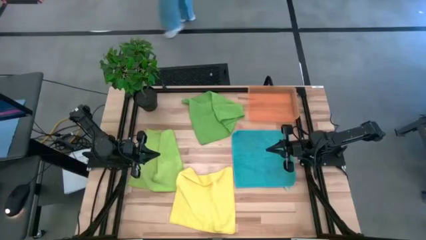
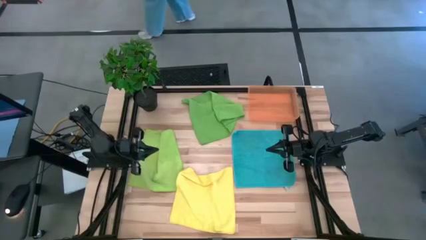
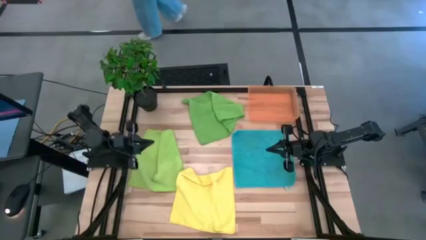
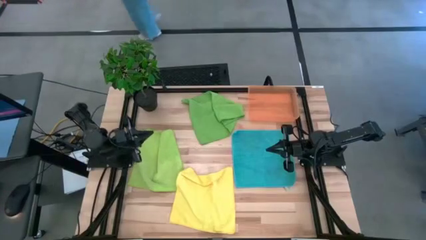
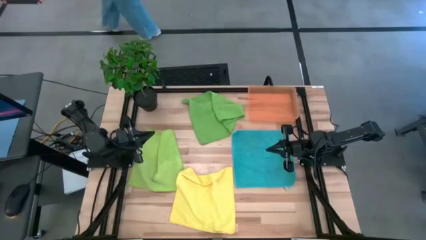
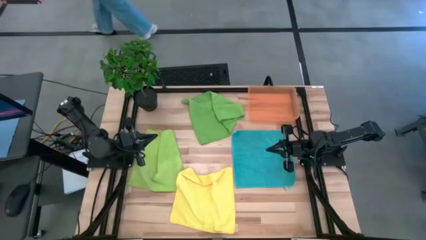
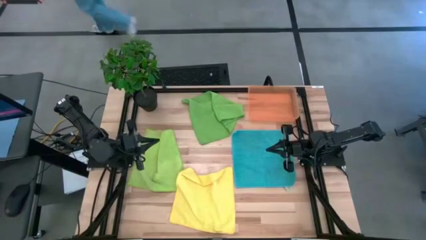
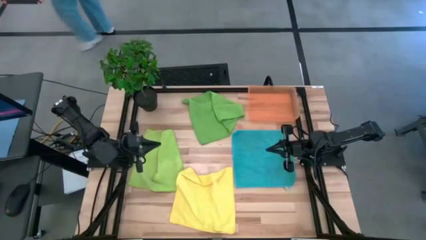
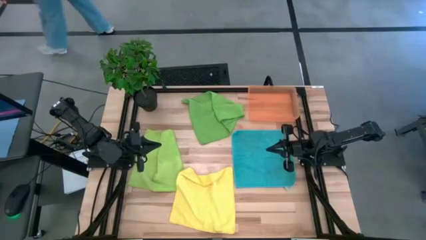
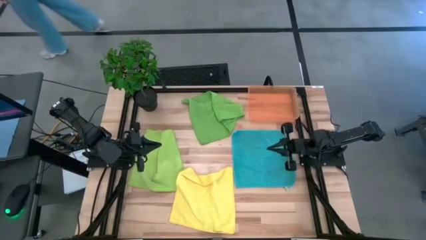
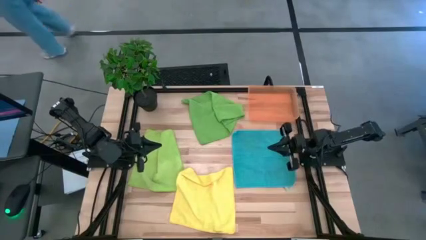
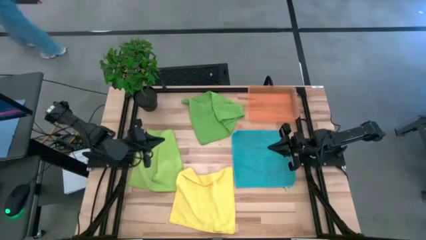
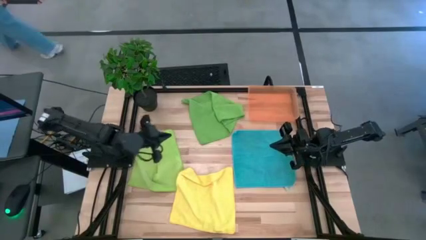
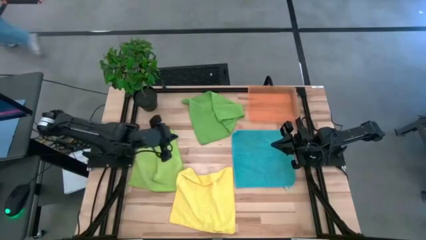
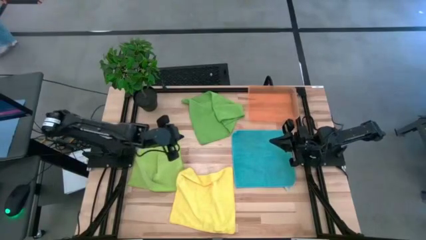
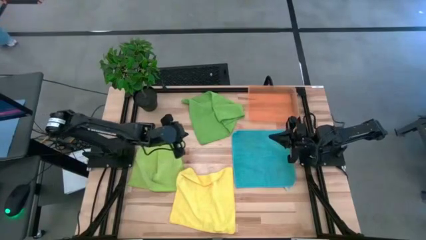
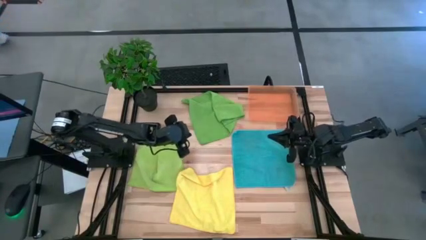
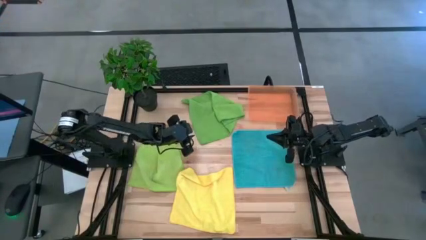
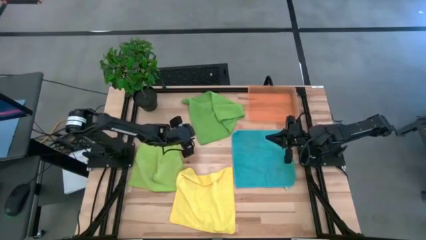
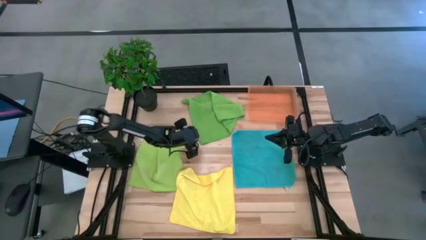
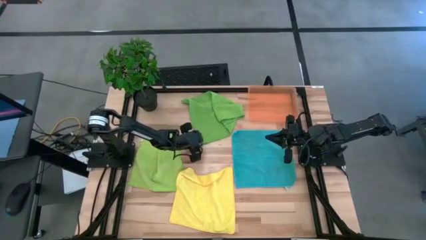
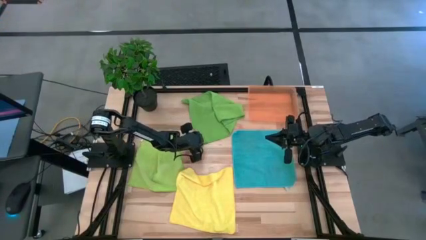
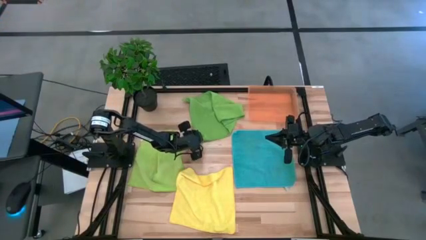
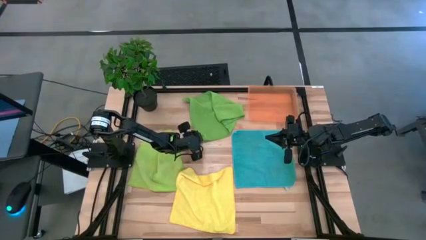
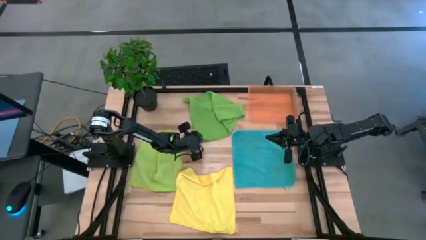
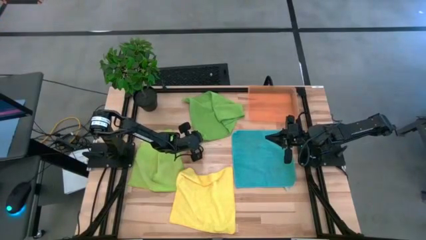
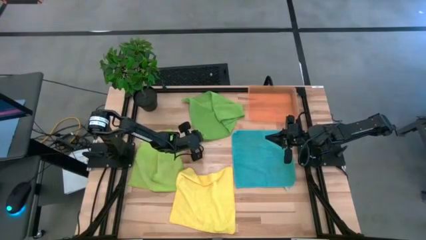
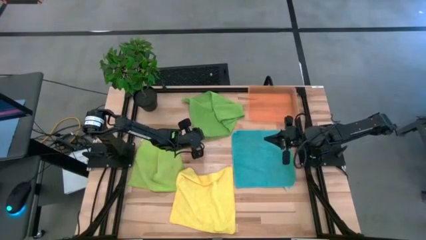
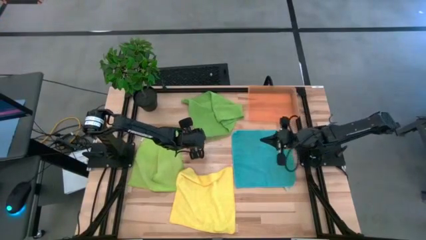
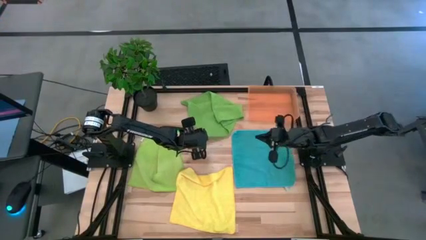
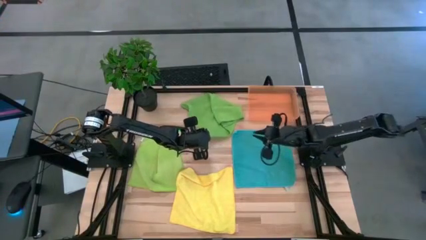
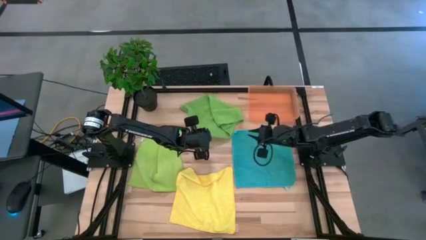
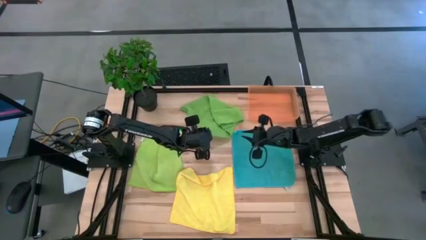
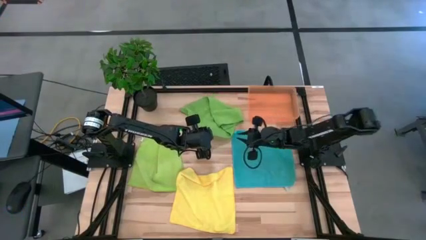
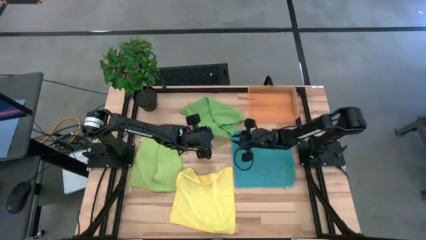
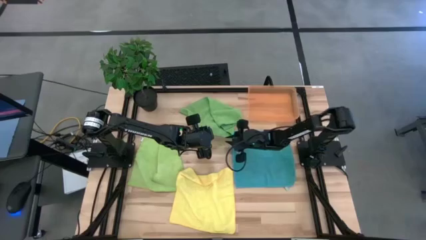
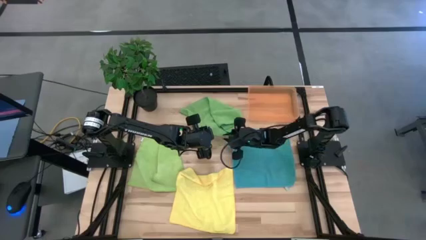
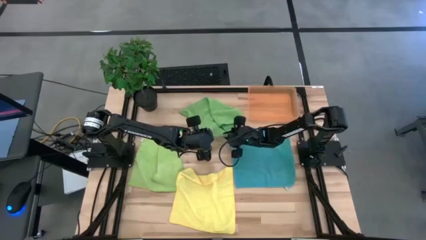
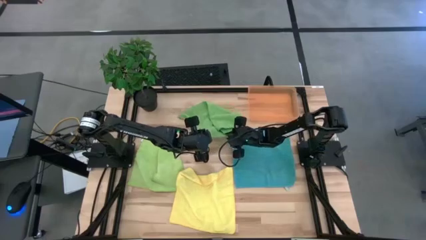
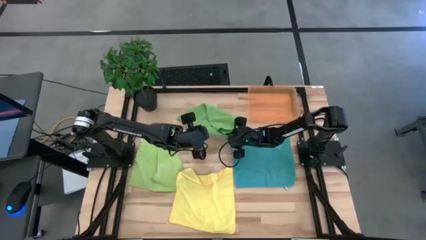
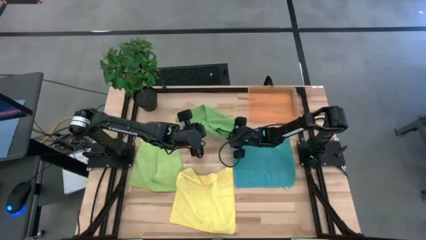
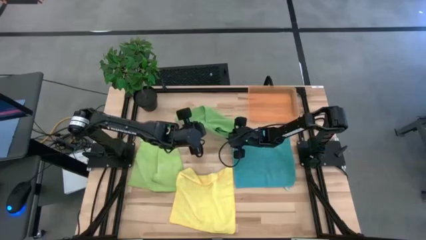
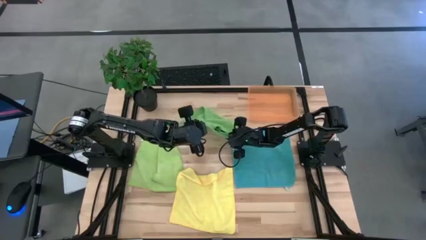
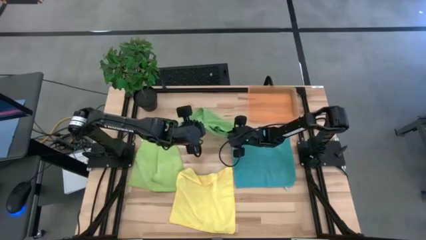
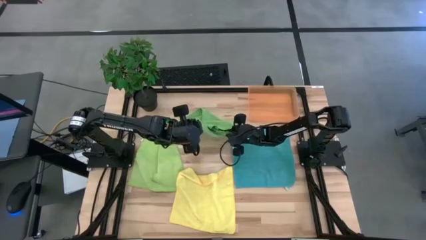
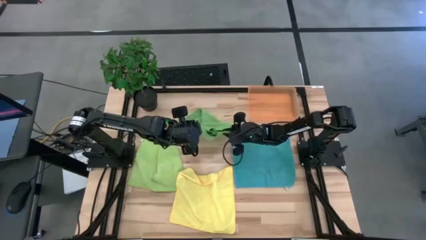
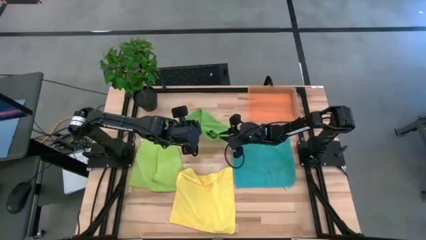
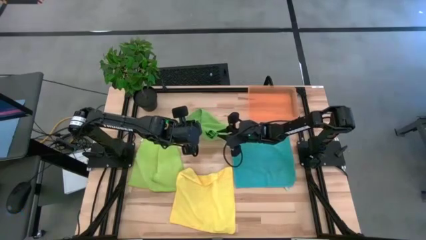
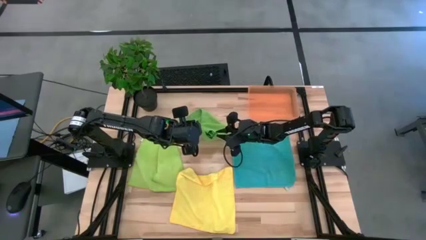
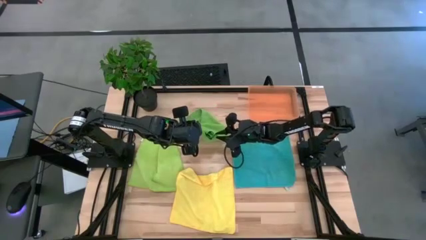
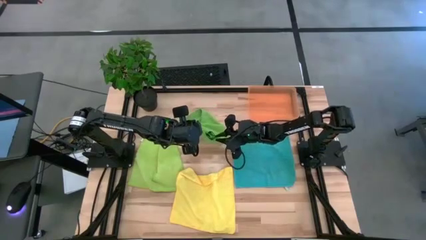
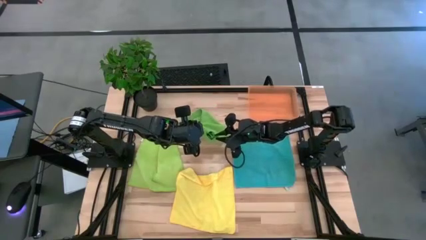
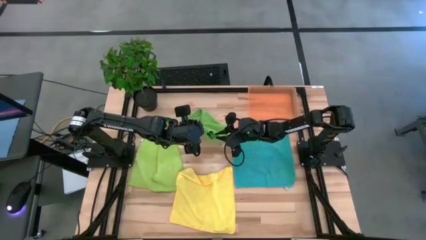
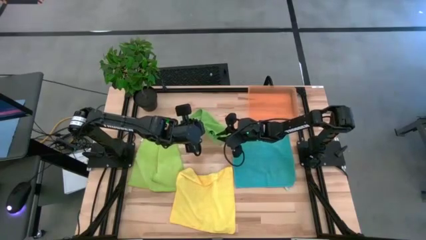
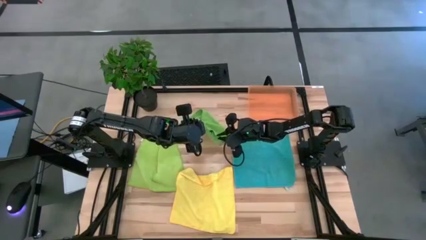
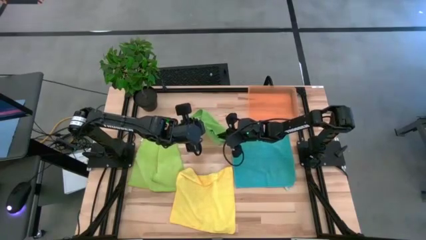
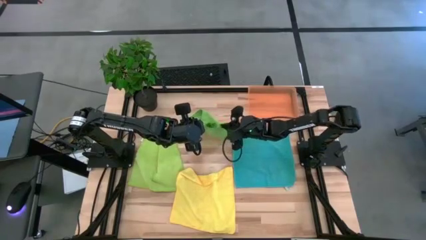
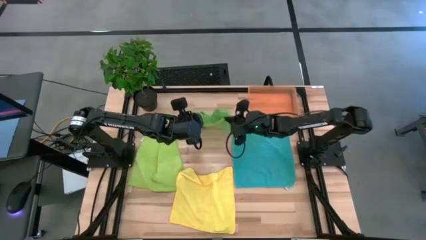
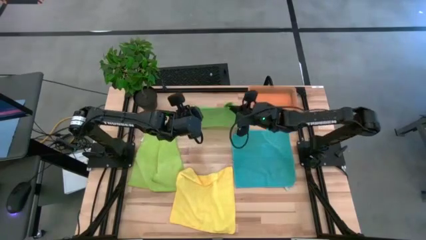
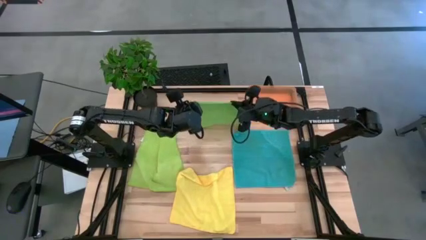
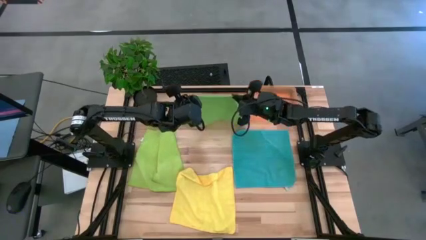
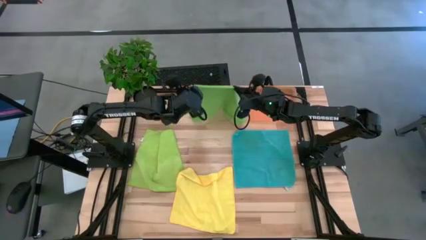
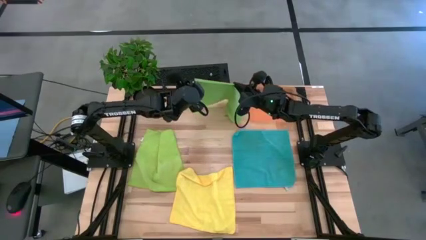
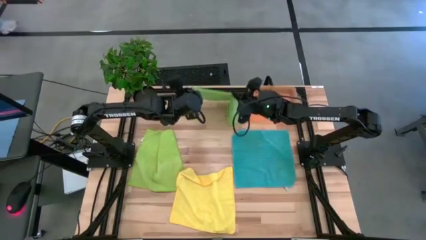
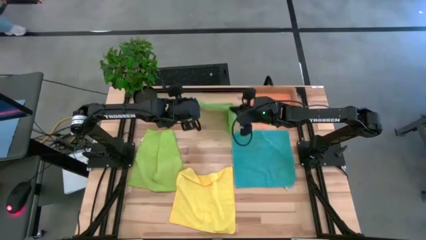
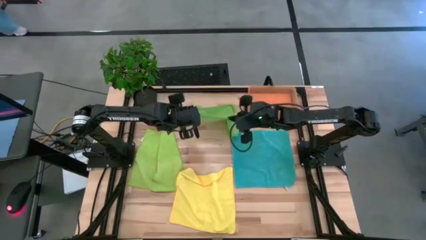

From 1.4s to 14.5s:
Task: Fold microfiber towels
Fold the green microfiber towel
